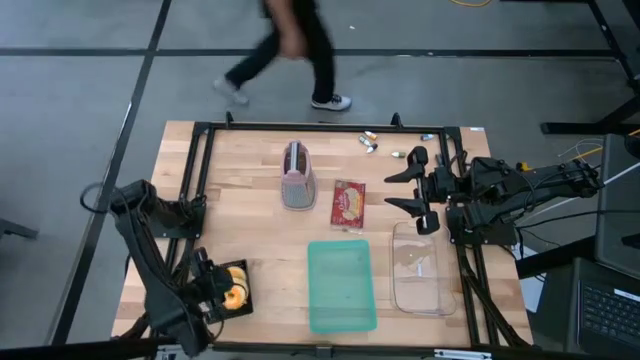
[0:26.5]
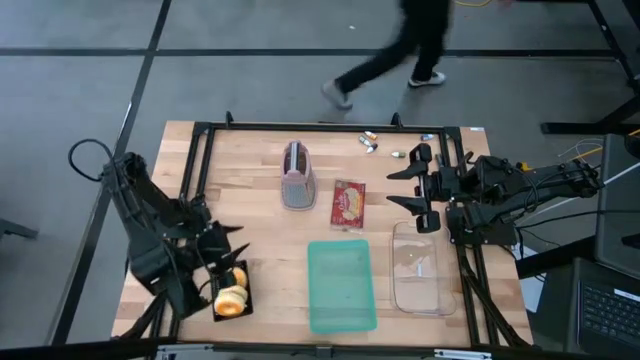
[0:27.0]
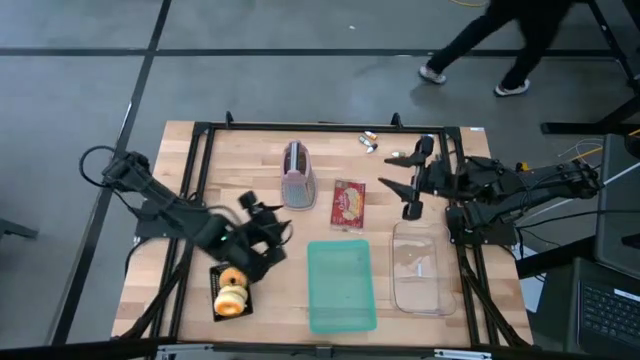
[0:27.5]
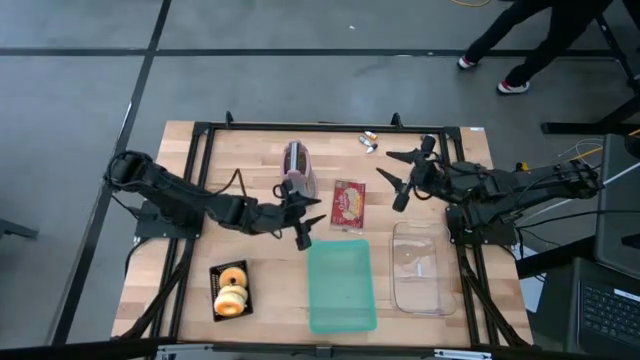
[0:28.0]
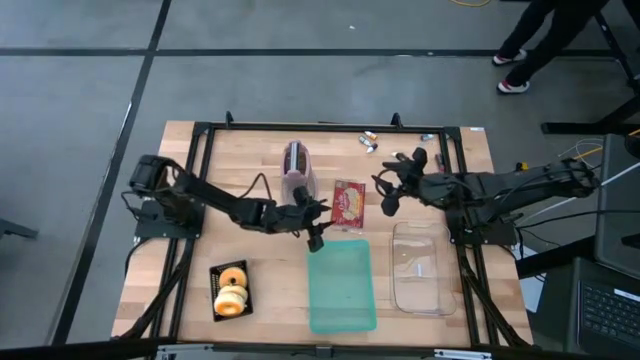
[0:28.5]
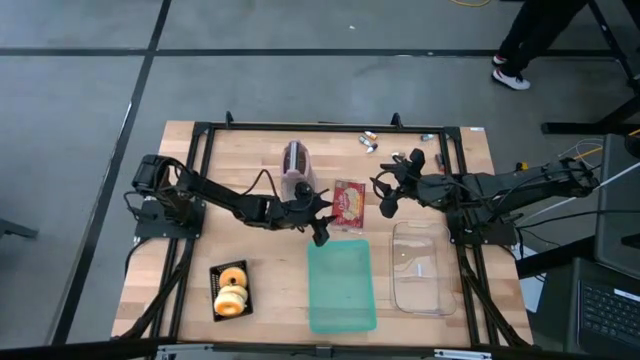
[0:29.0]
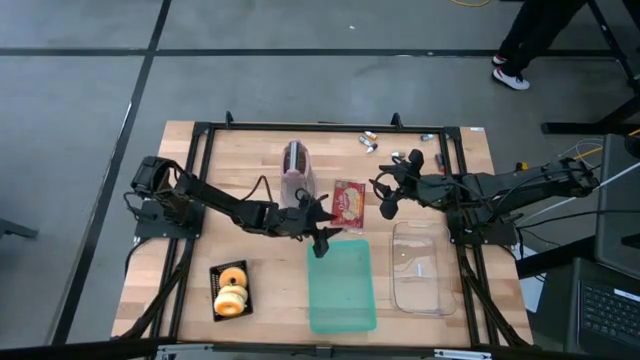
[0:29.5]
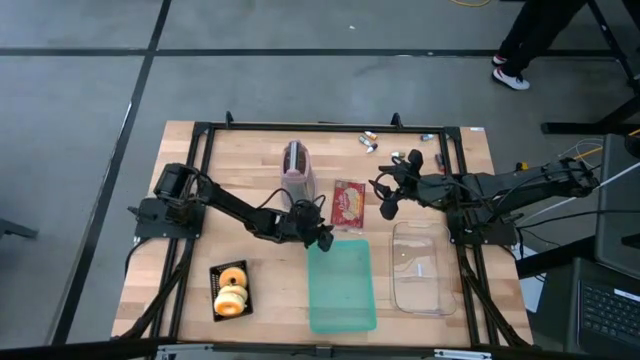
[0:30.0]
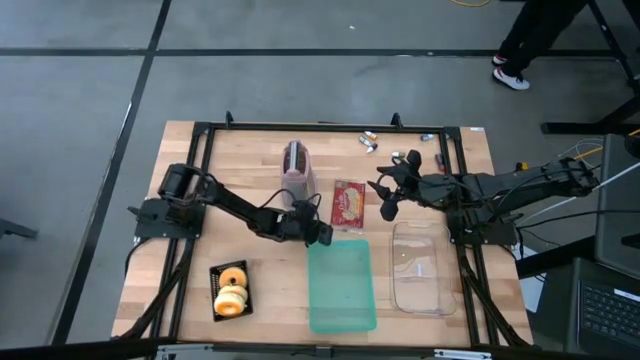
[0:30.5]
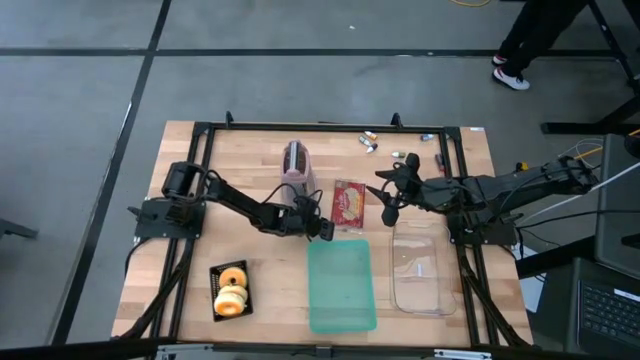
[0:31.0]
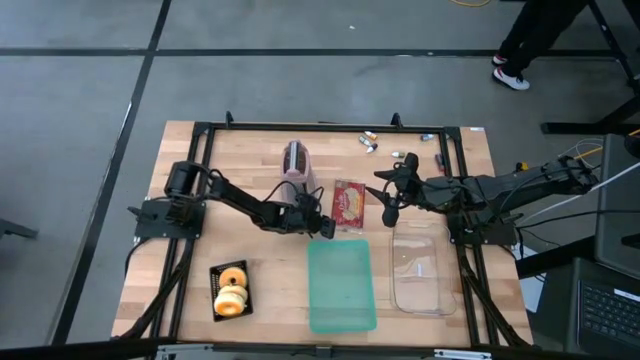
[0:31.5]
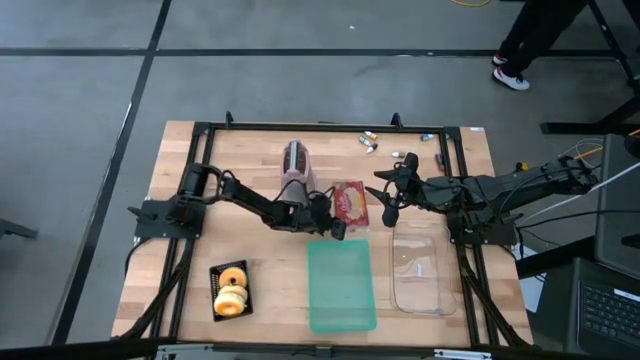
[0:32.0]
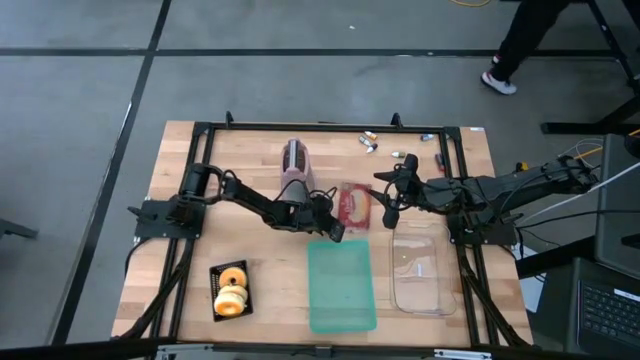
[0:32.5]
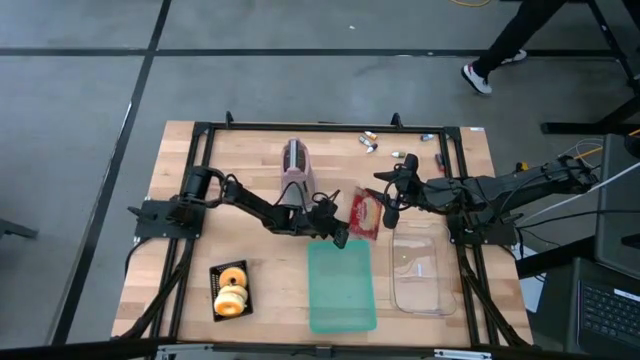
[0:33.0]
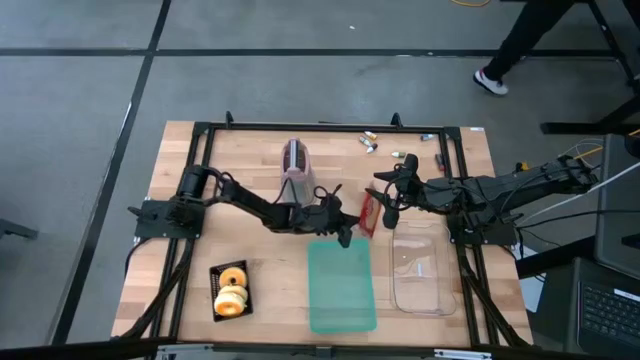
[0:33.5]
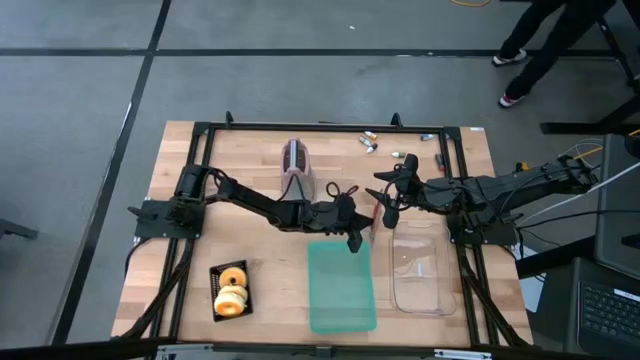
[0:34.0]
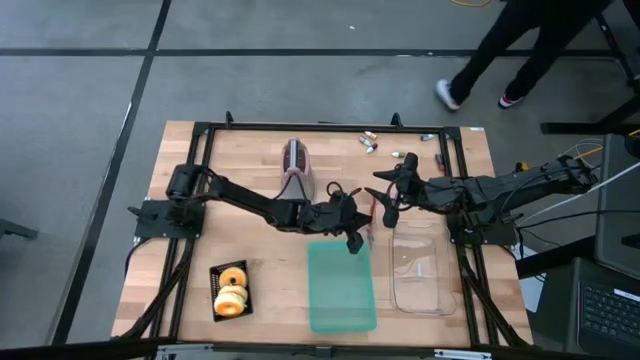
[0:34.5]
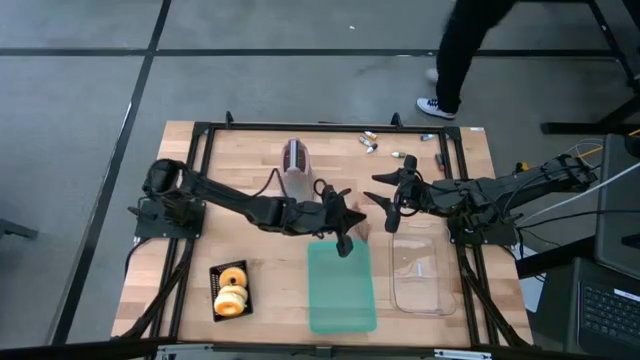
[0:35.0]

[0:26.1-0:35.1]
Task: Pick & Place Food Item
Put the red popcorn bag into the blue bin

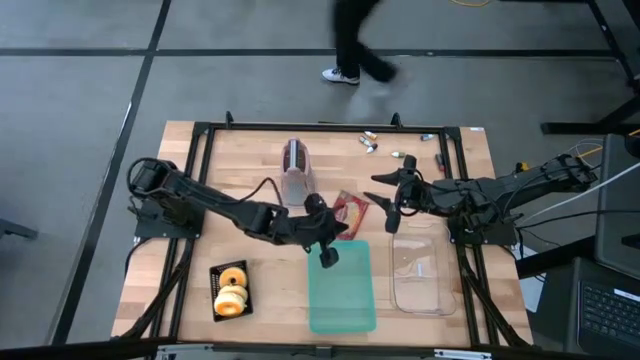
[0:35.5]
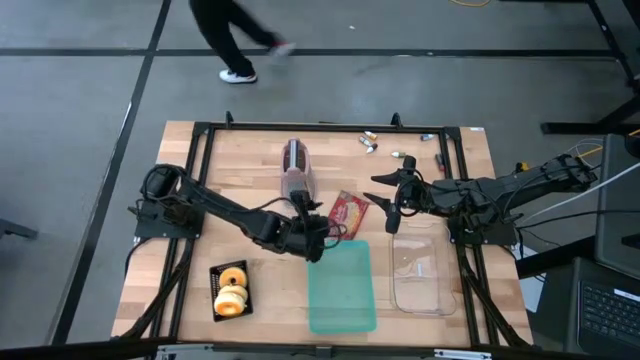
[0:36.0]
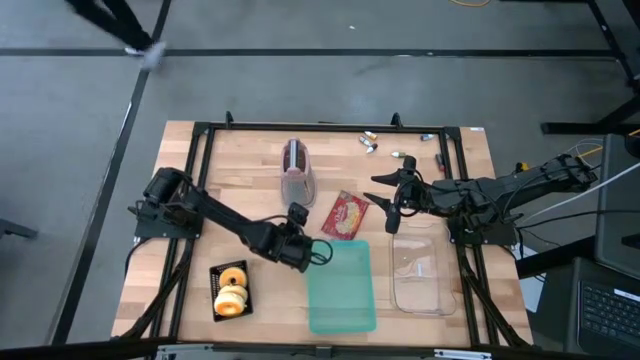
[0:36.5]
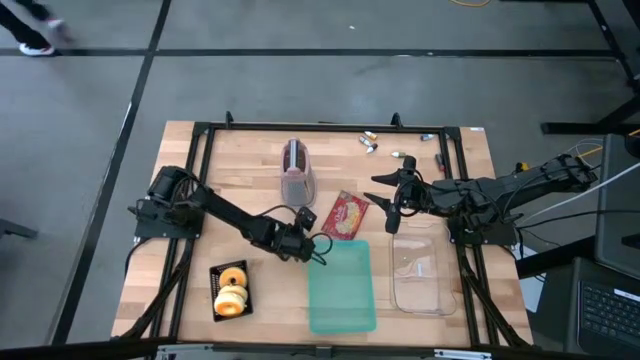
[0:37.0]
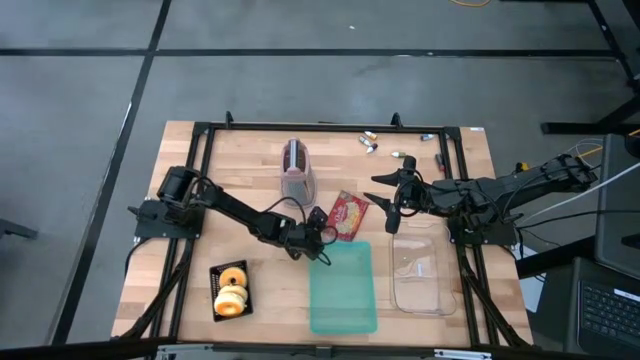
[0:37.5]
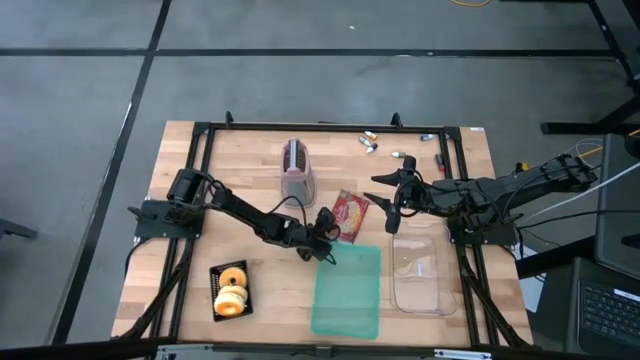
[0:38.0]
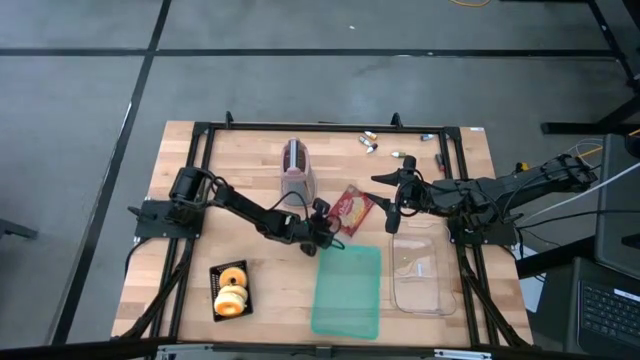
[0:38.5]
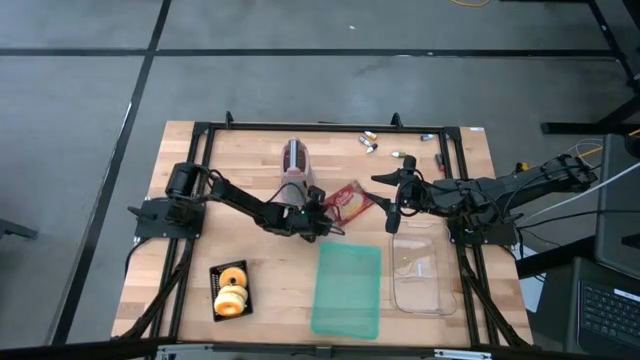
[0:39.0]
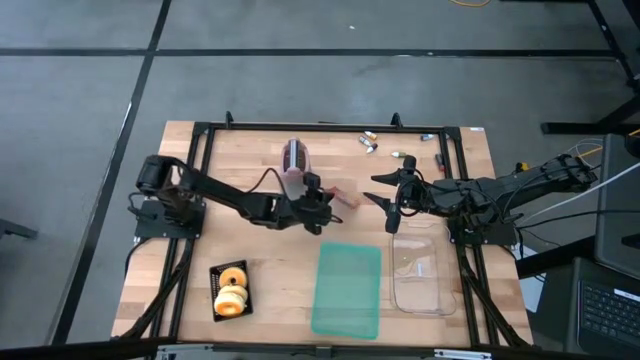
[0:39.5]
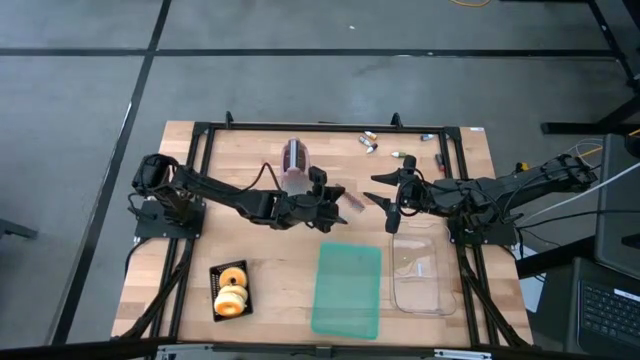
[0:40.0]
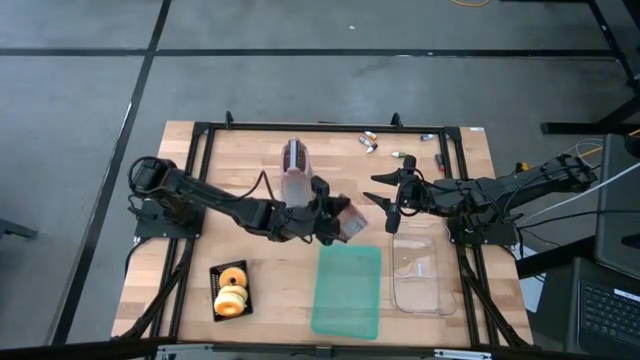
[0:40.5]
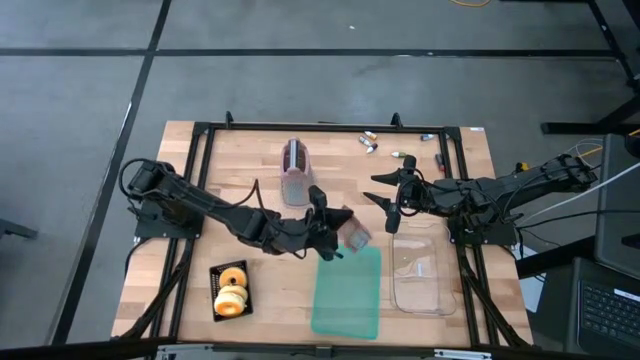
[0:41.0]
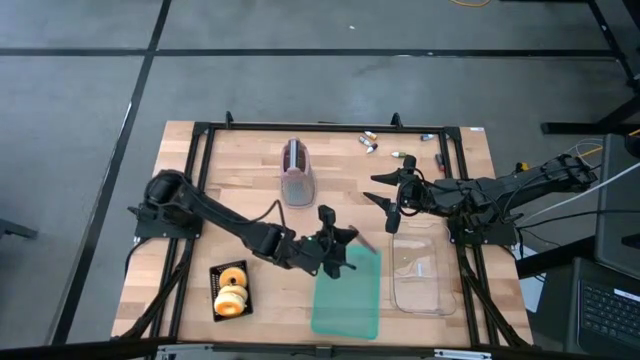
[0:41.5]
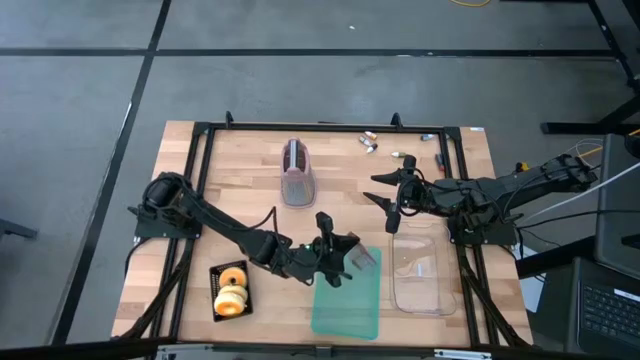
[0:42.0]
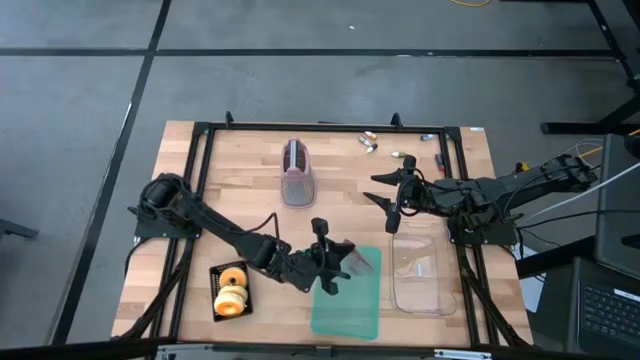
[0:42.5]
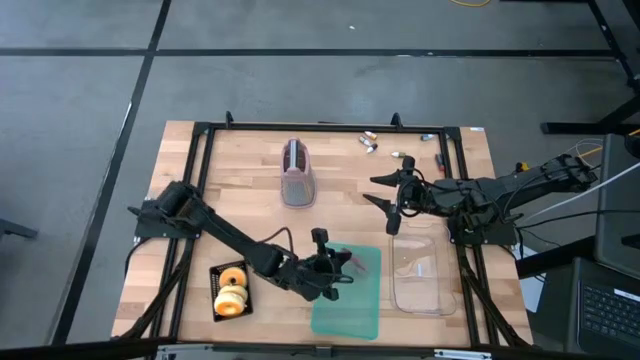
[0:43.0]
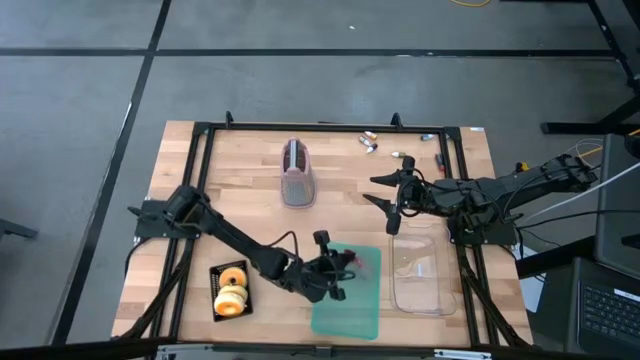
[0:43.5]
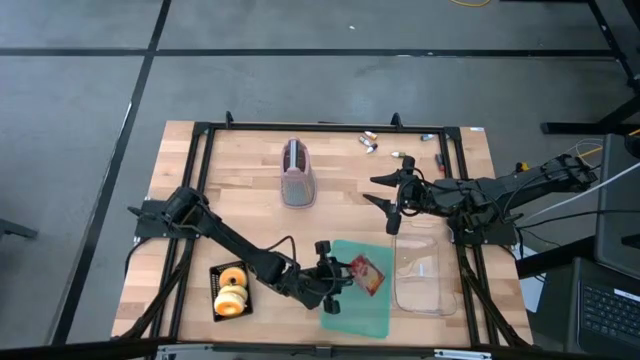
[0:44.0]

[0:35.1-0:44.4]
Put the red popcorn bag into the blue bin

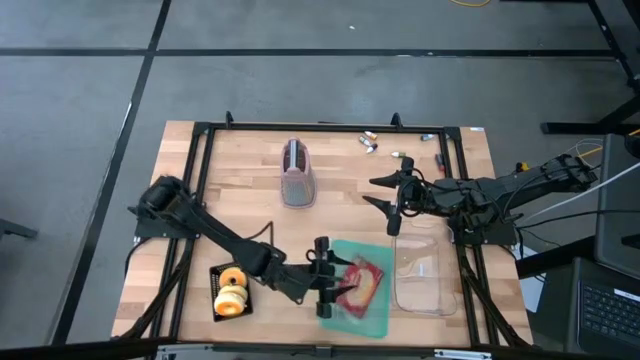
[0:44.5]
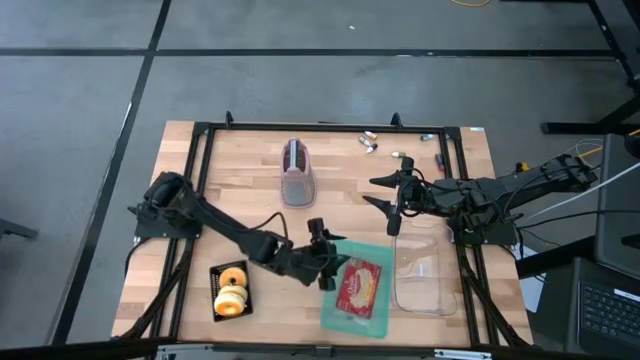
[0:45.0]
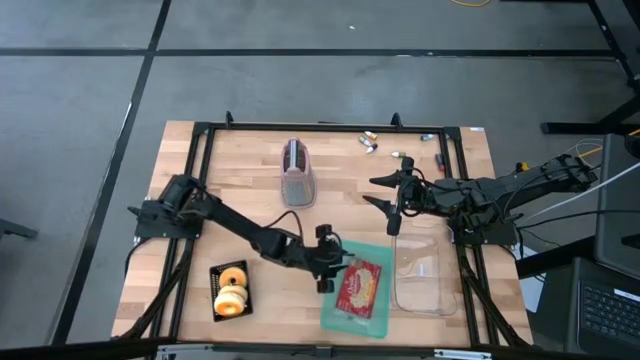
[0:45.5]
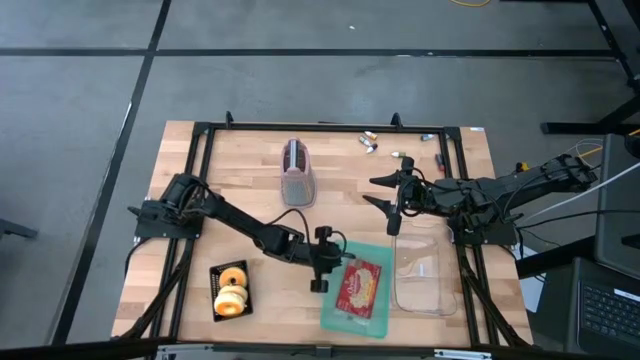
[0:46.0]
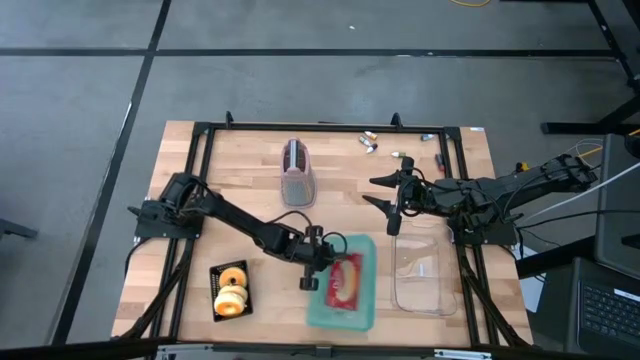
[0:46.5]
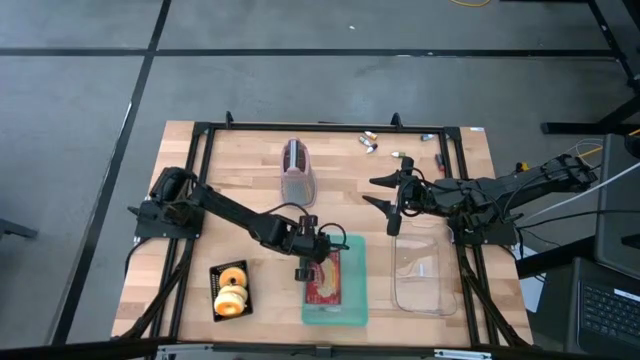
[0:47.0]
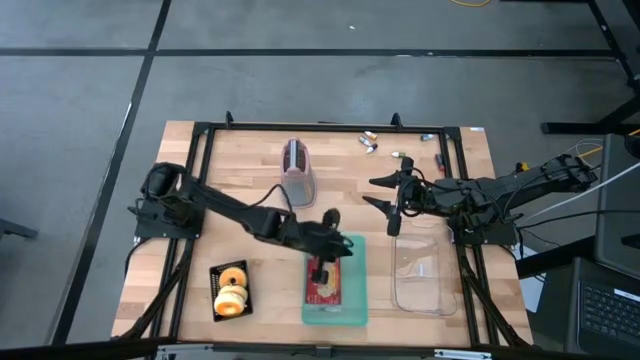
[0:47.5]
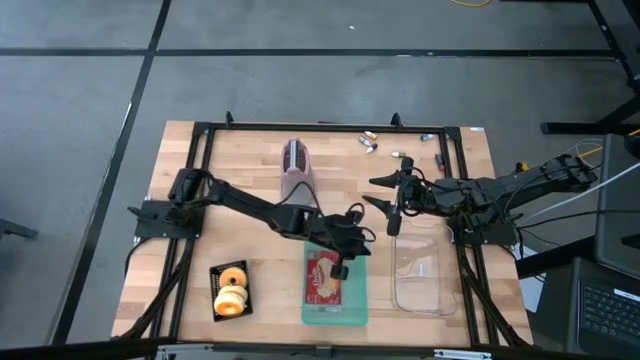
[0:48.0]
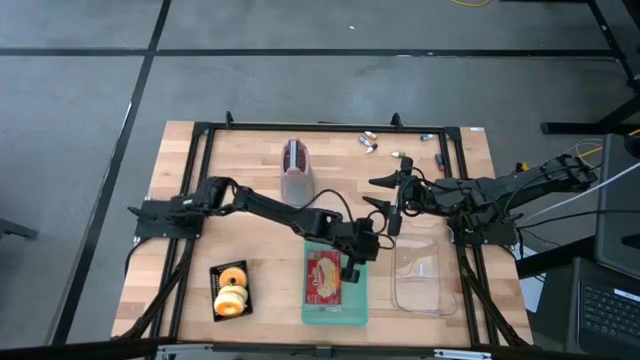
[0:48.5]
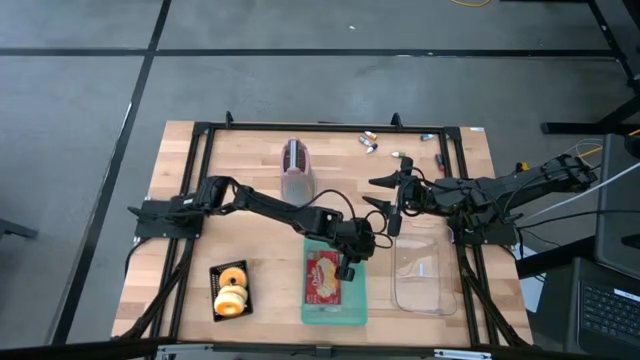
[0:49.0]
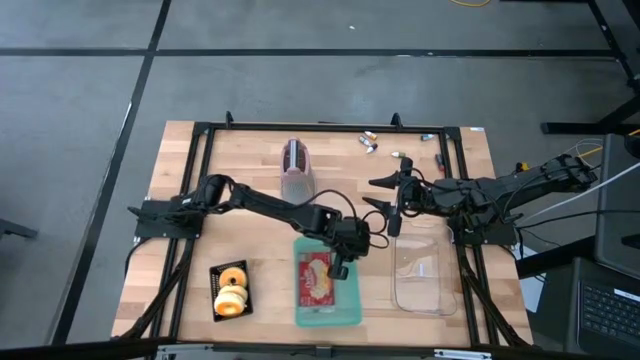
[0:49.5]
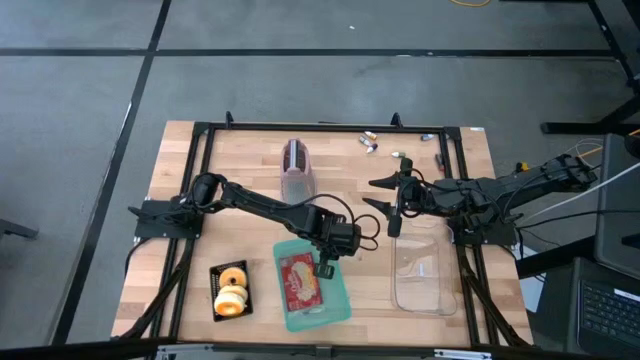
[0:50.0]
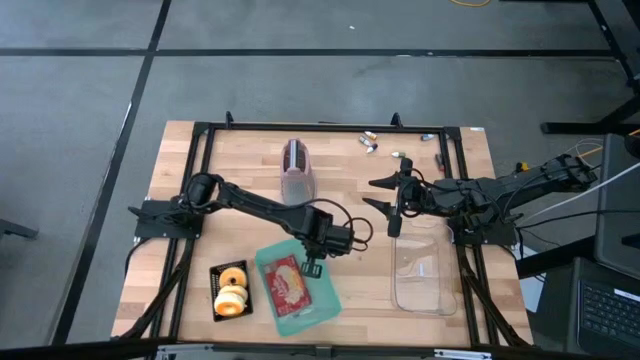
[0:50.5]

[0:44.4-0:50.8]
Adjust the blue bin on the table
